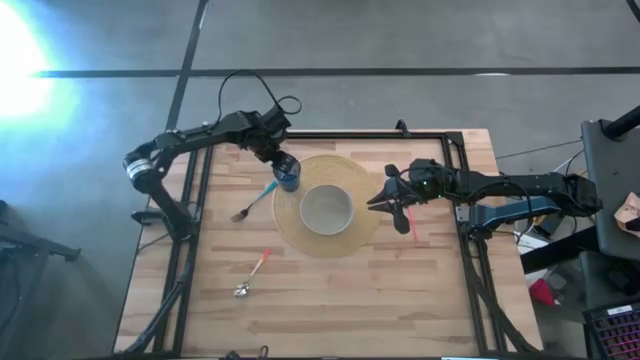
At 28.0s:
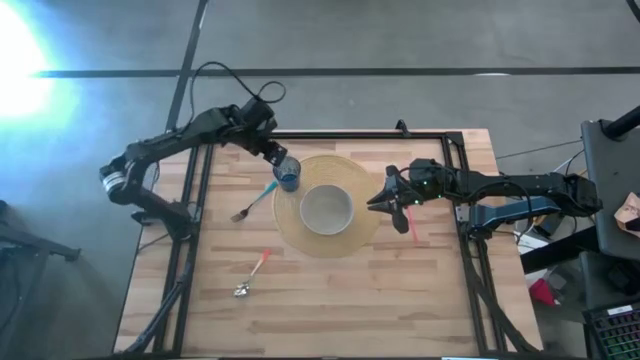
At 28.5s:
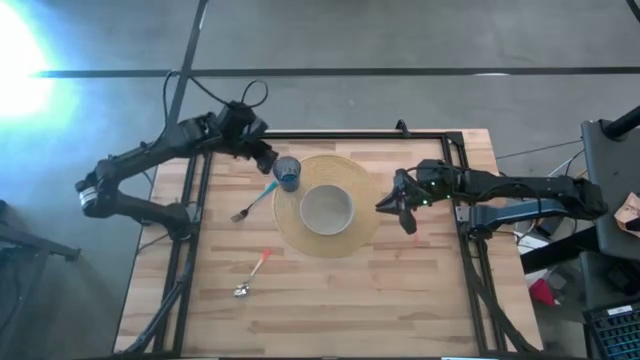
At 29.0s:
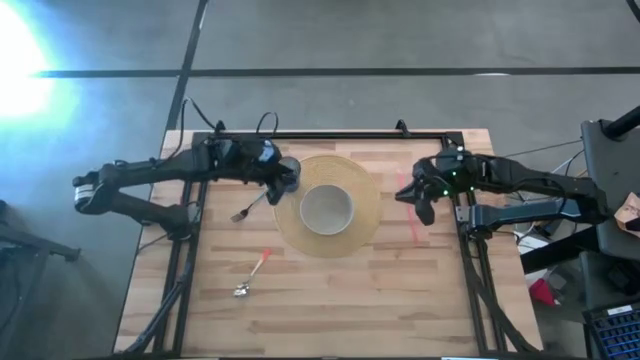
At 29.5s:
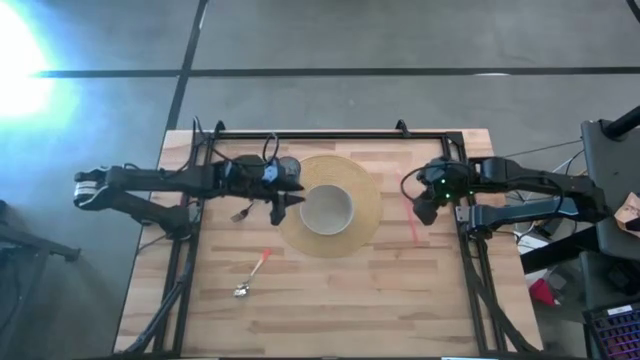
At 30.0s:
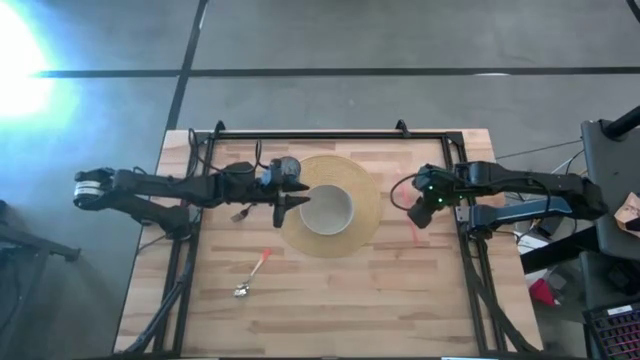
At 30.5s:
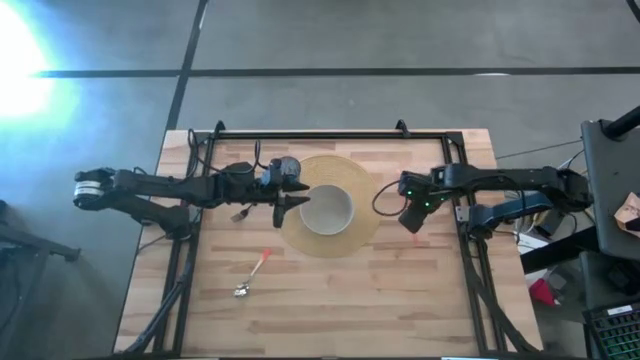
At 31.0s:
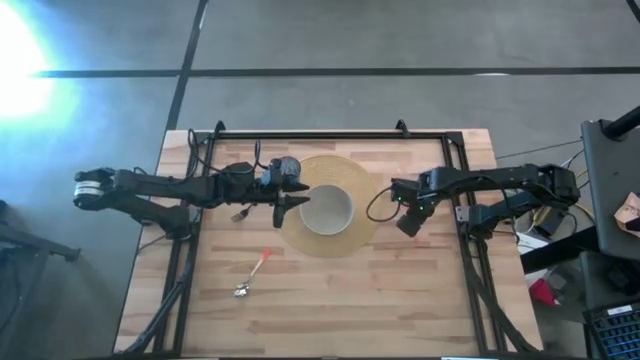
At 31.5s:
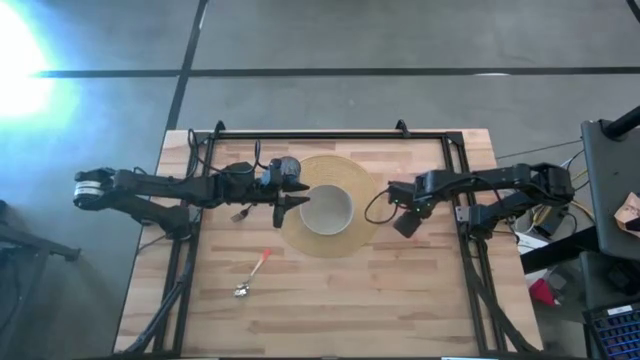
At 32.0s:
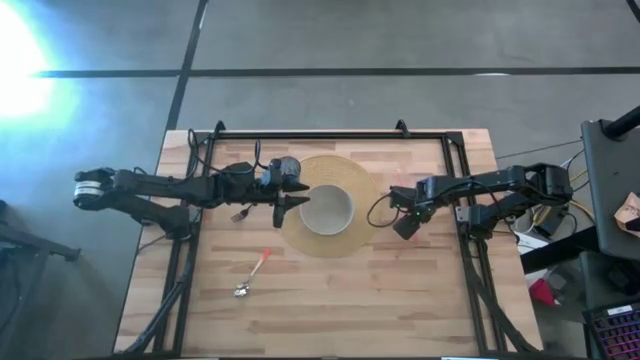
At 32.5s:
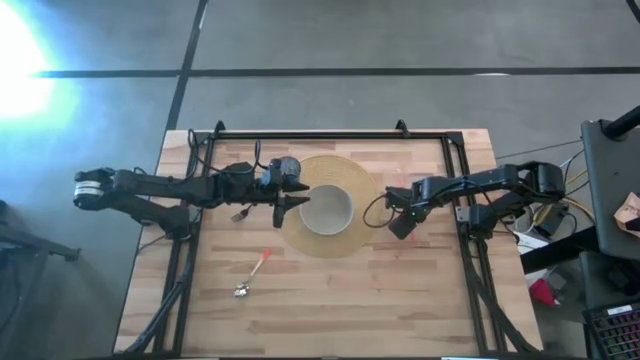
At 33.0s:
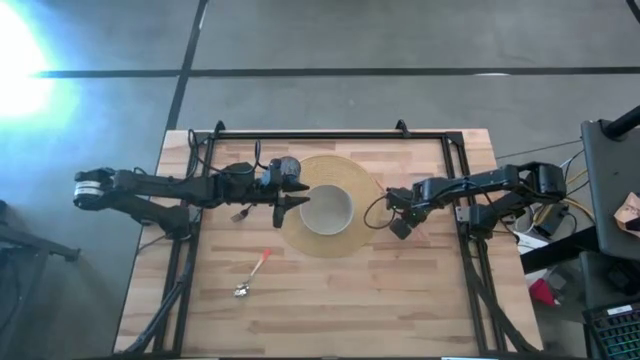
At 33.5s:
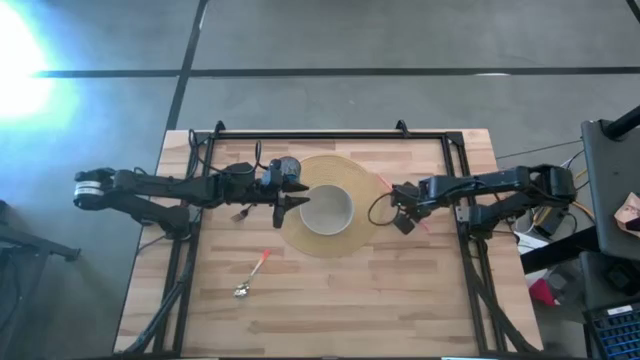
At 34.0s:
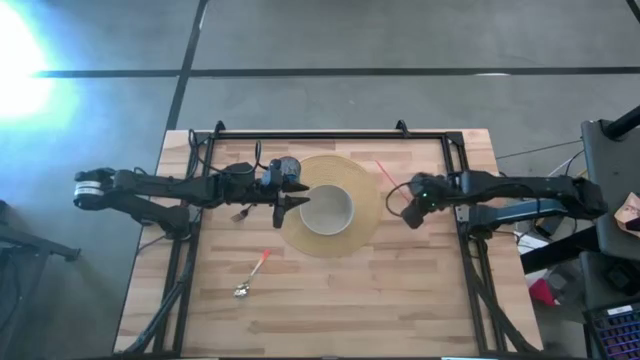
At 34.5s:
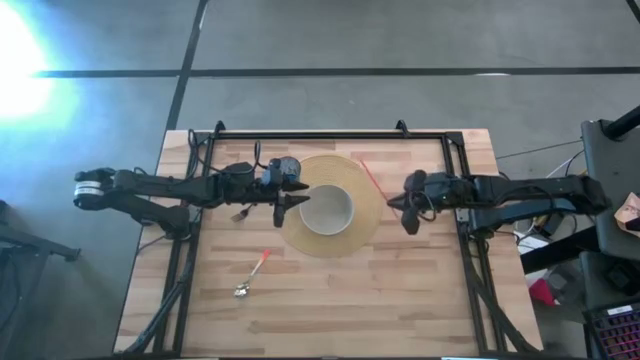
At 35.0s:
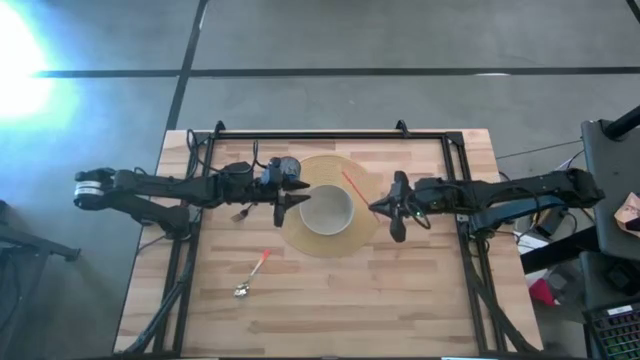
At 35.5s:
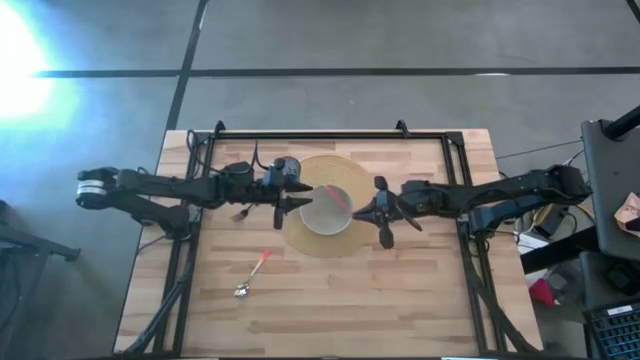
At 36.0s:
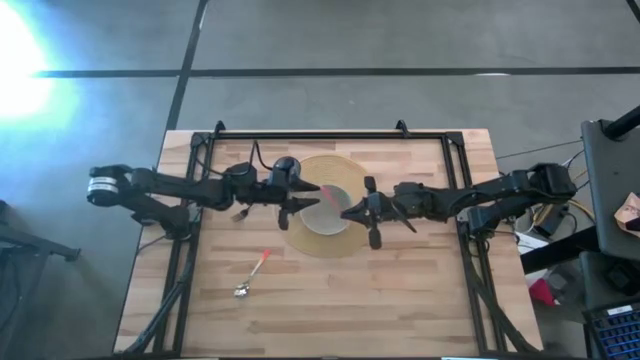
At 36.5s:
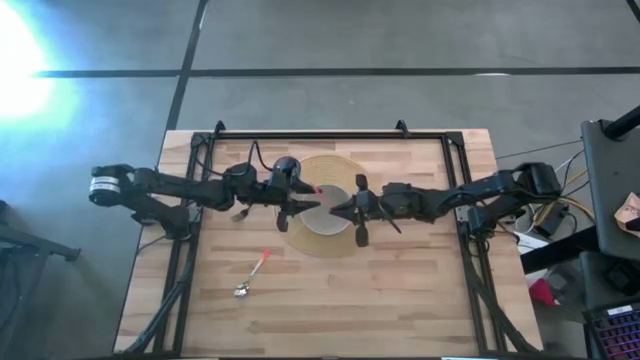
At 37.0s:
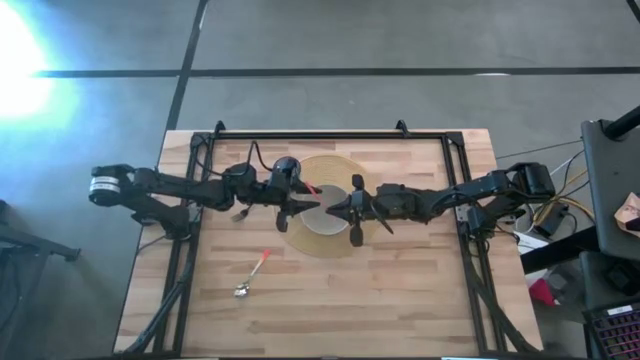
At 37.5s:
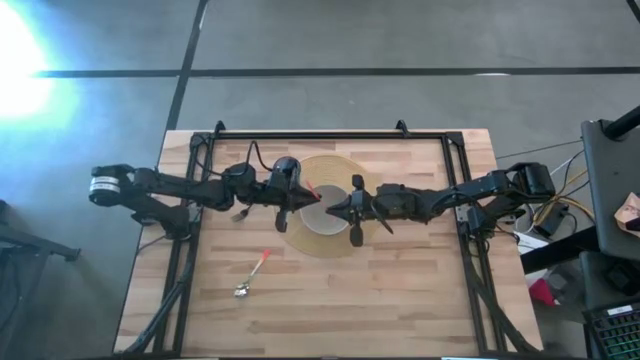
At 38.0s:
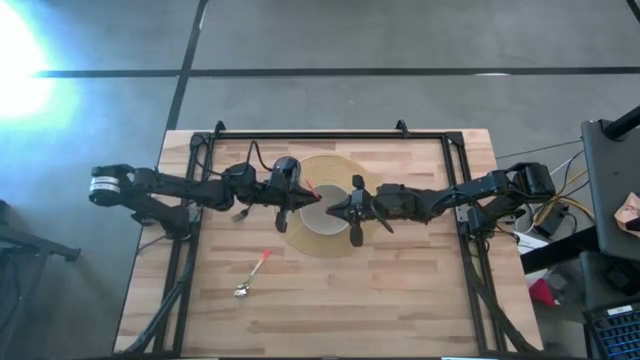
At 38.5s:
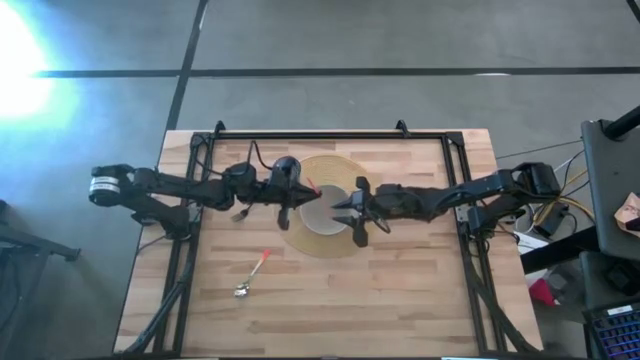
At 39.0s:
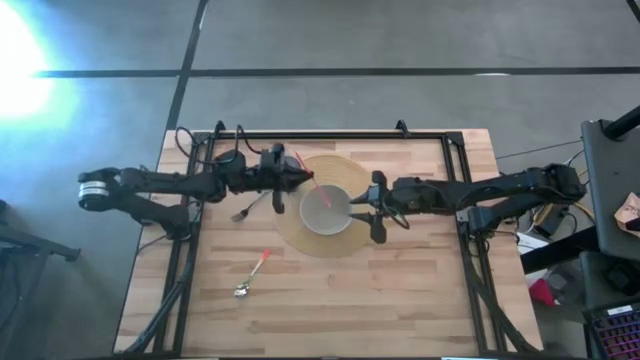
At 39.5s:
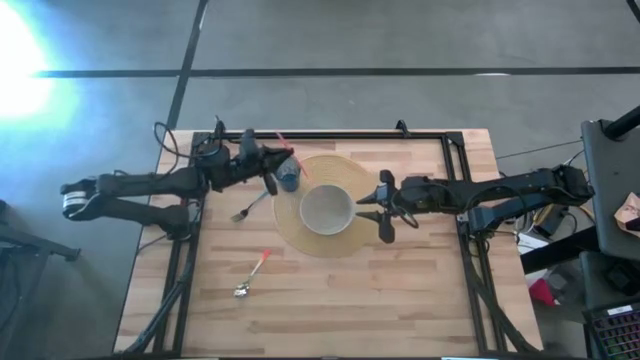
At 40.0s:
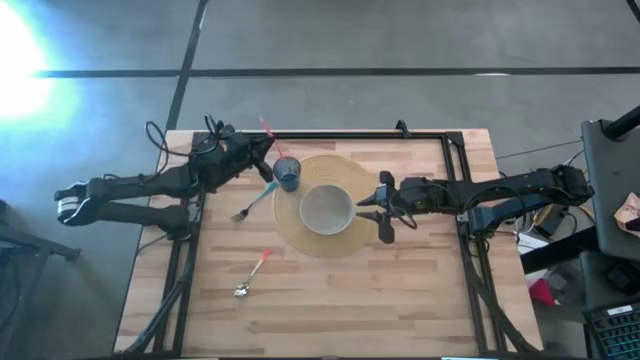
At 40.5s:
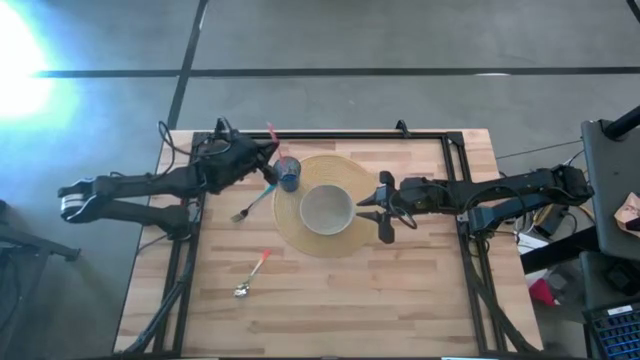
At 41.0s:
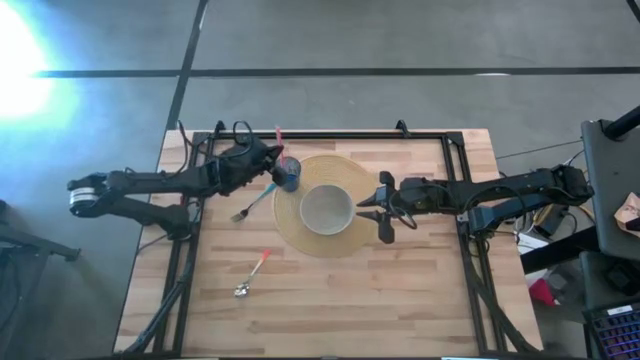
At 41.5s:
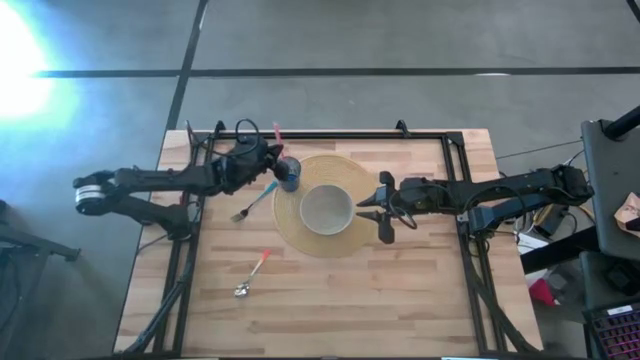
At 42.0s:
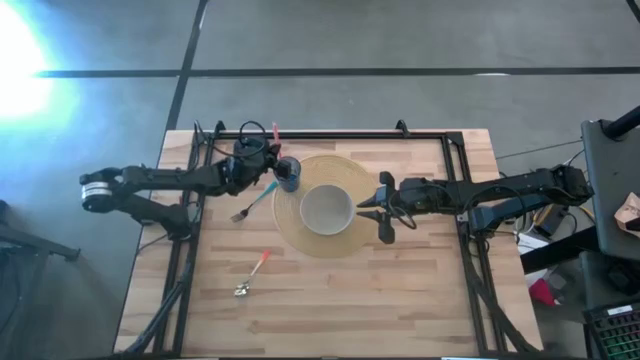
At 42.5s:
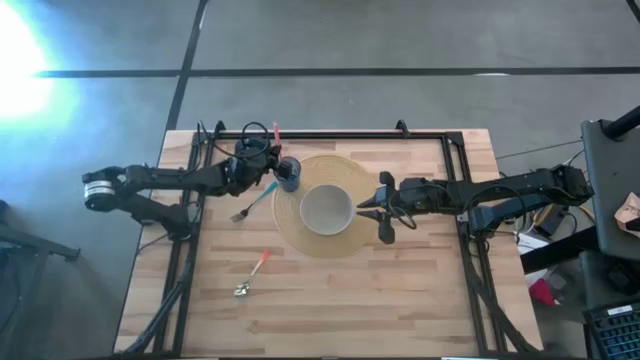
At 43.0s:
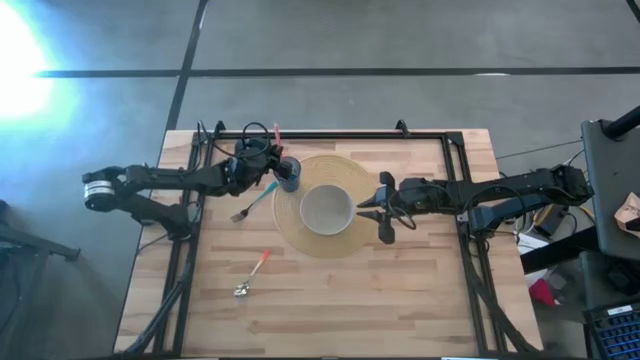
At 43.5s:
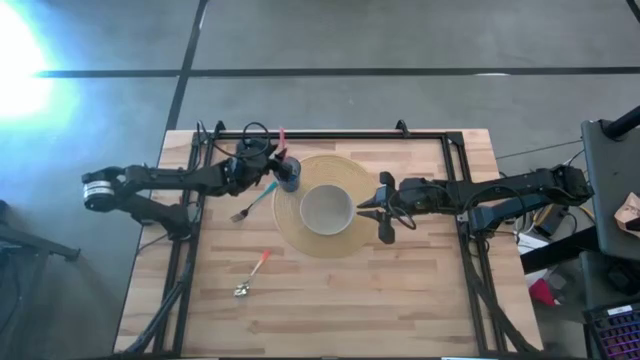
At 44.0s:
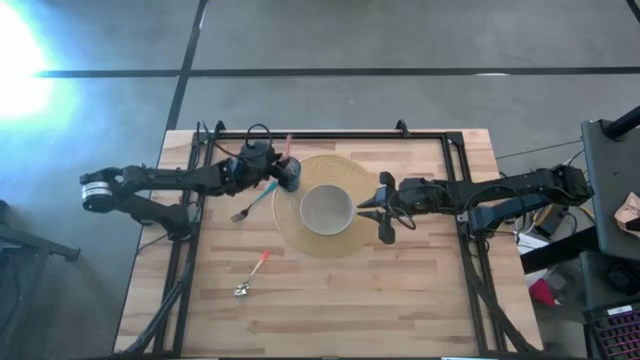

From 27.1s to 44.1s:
Task: Pick & Place Utensil
Put the orange straw into the blue cup on the brown mat

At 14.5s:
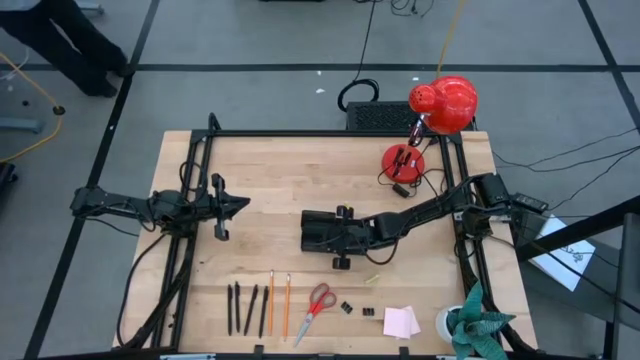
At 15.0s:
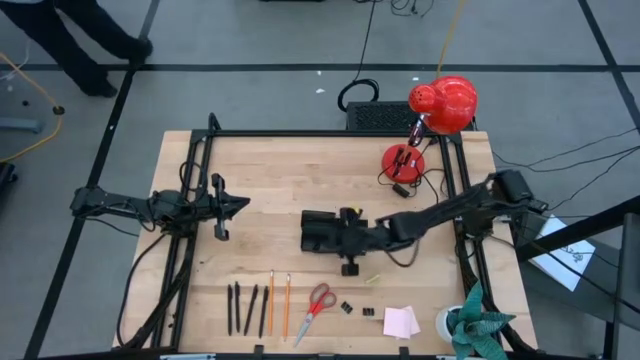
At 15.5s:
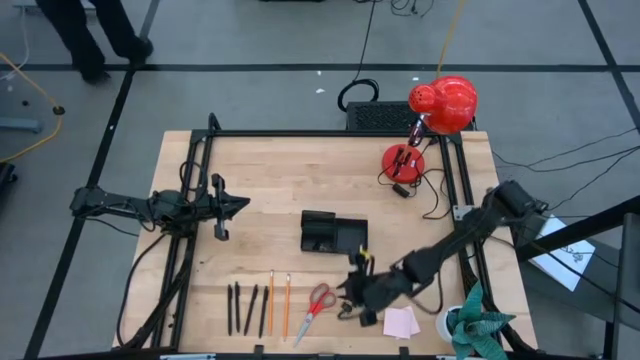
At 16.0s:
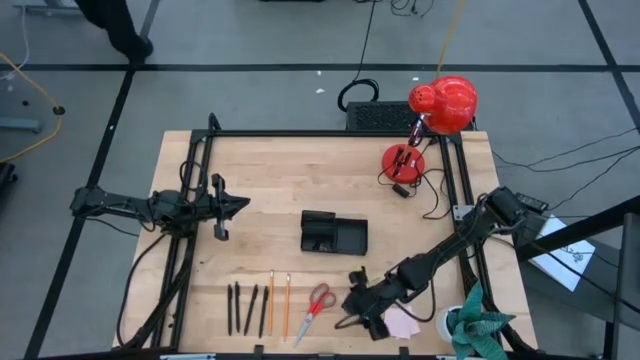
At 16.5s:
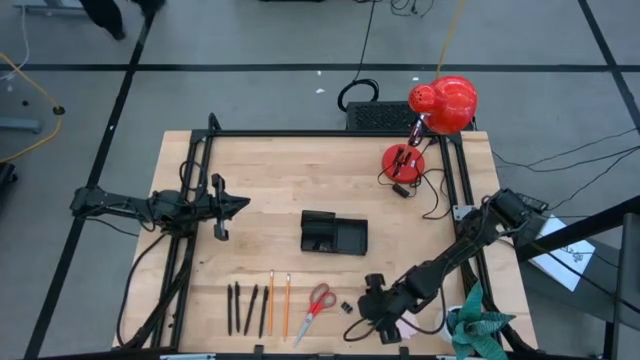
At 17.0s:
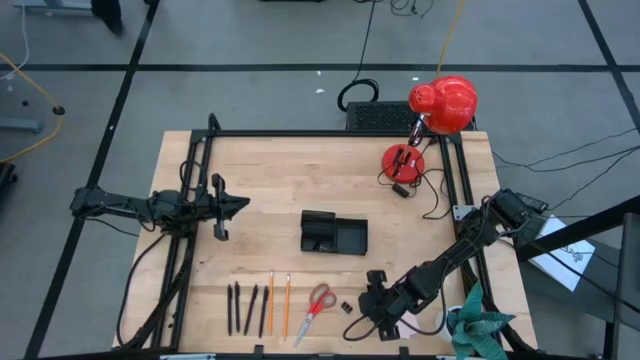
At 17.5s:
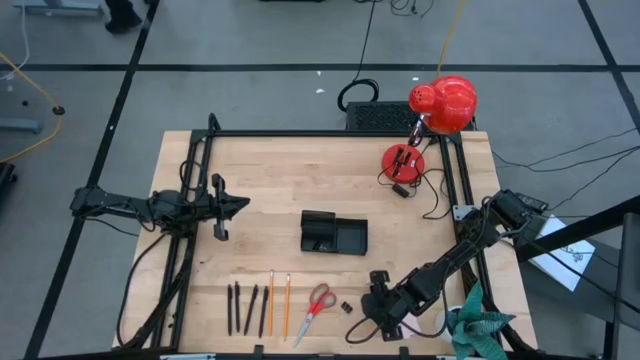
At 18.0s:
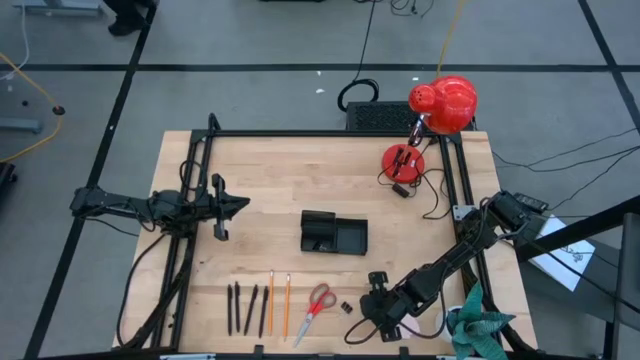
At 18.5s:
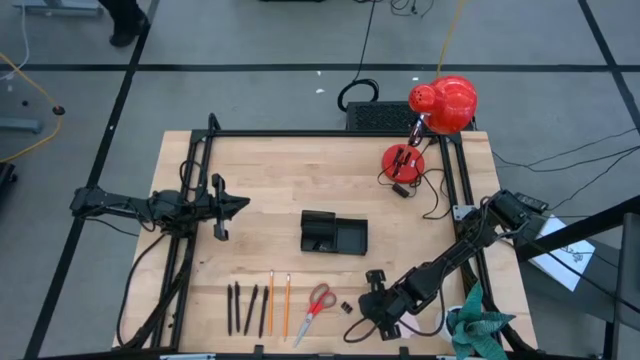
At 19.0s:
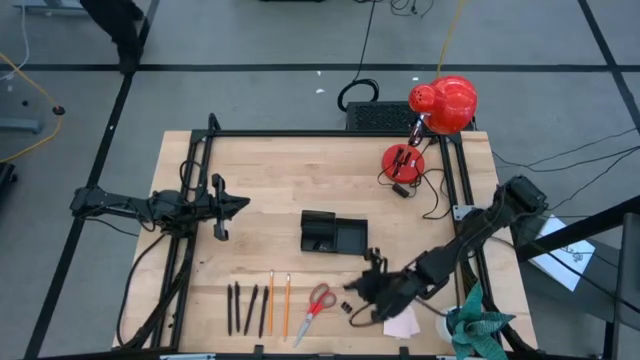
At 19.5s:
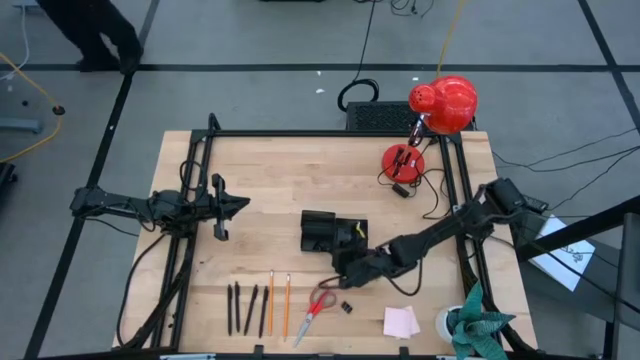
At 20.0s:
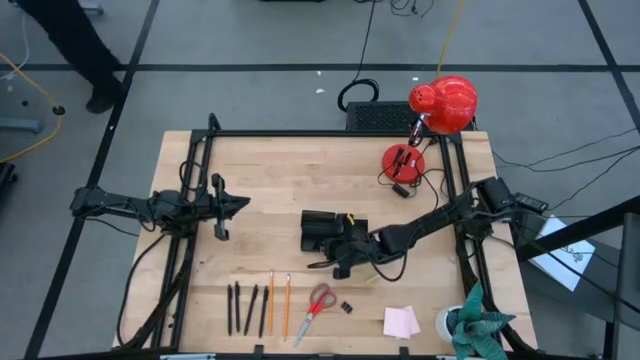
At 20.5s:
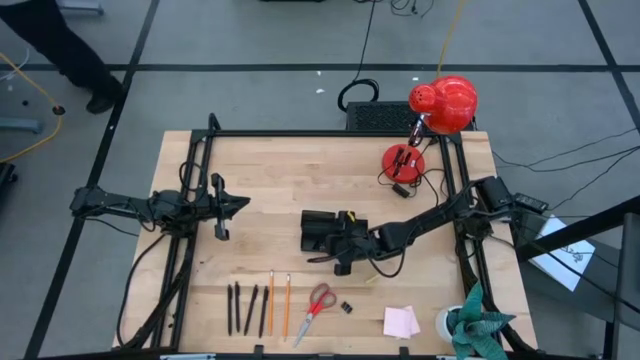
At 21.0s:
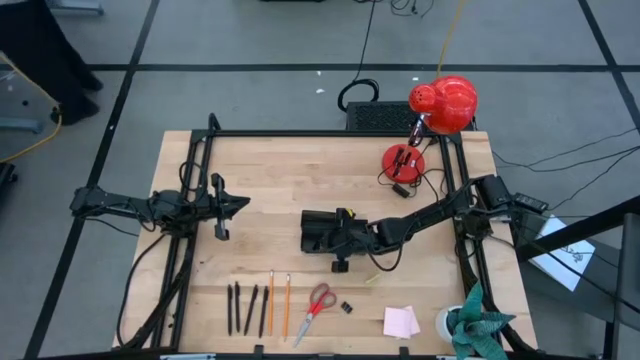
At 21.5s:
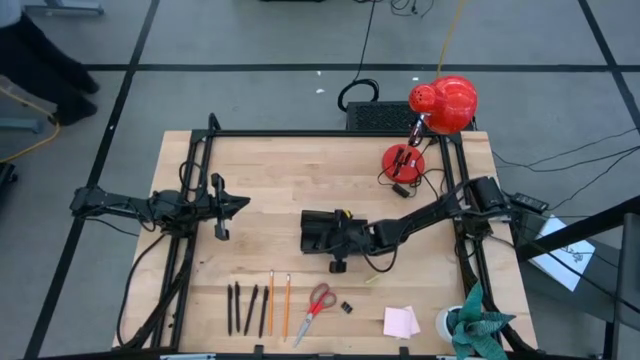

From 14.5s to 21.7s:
Task: Pick and place office supplies into organizer
Put the right binder clip into the desk organizer
